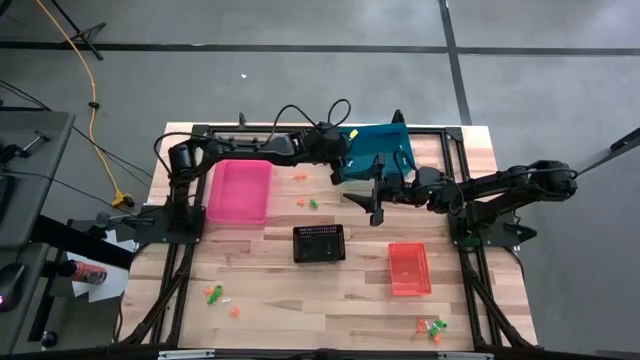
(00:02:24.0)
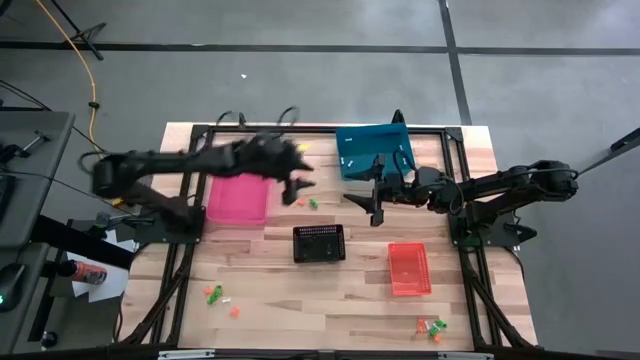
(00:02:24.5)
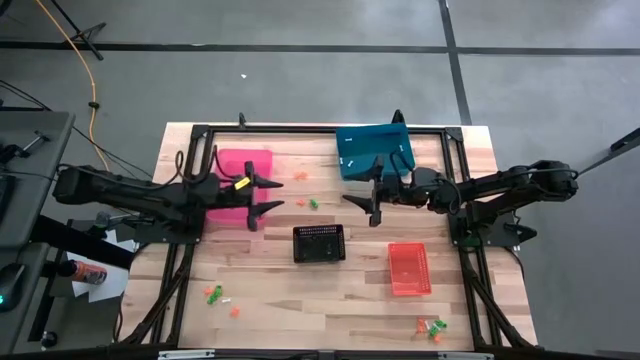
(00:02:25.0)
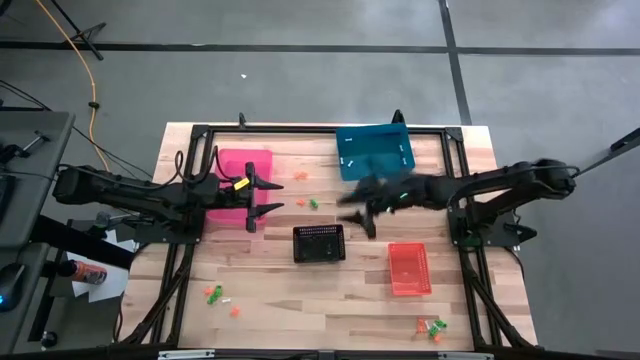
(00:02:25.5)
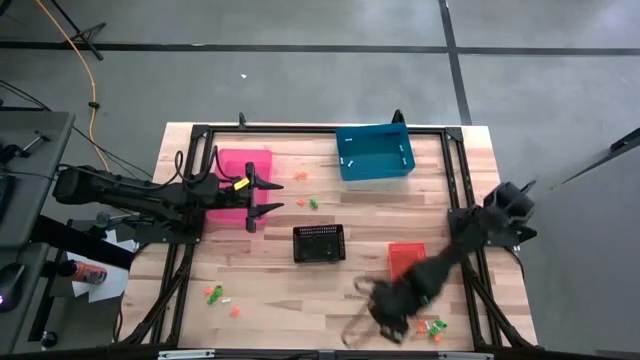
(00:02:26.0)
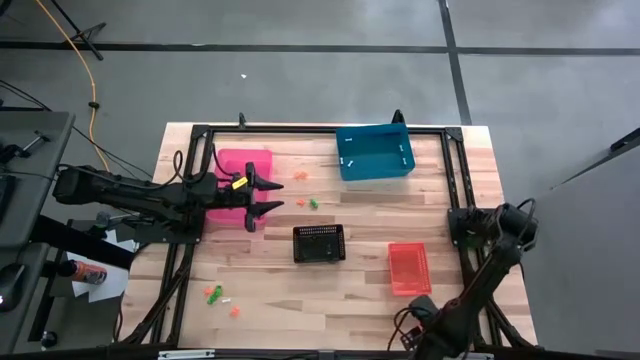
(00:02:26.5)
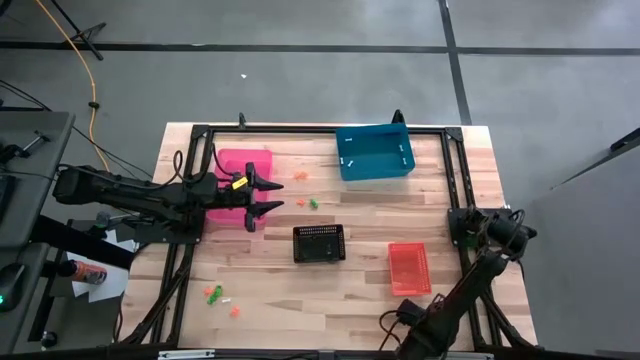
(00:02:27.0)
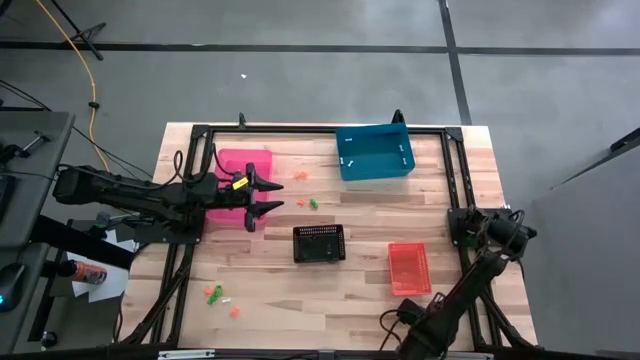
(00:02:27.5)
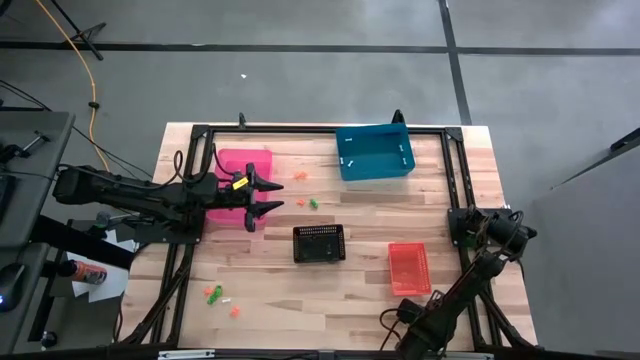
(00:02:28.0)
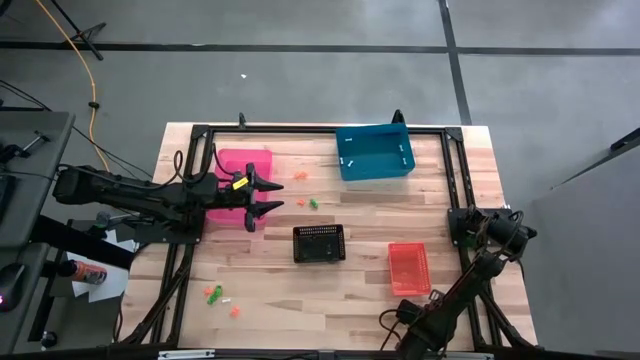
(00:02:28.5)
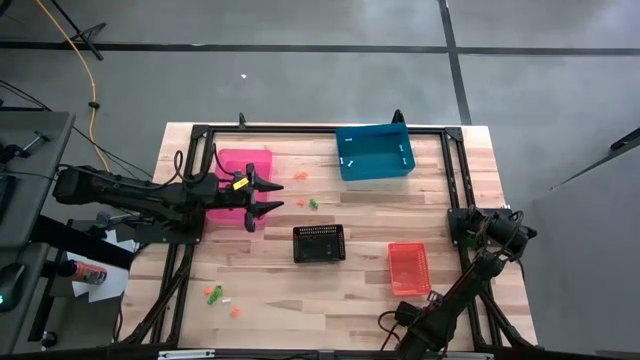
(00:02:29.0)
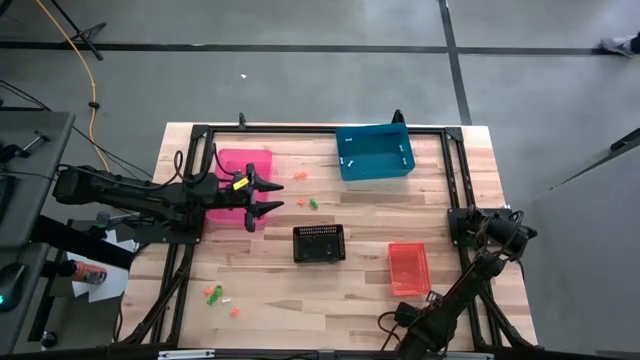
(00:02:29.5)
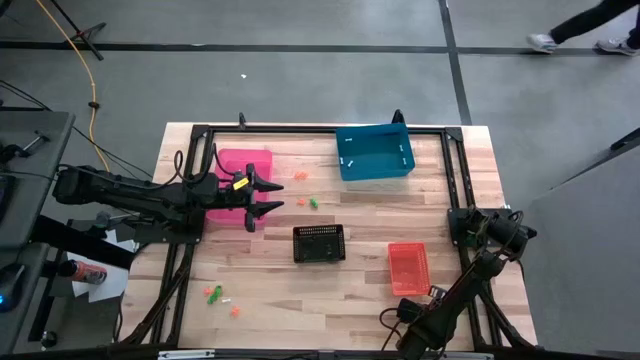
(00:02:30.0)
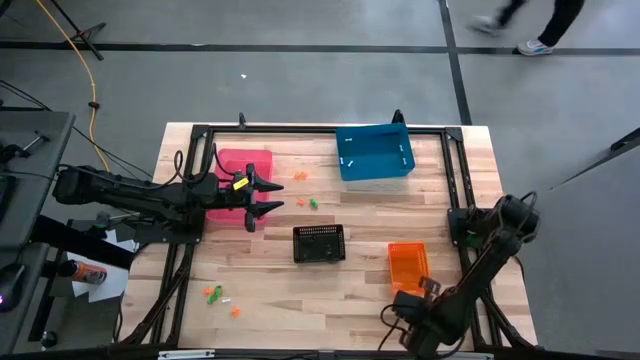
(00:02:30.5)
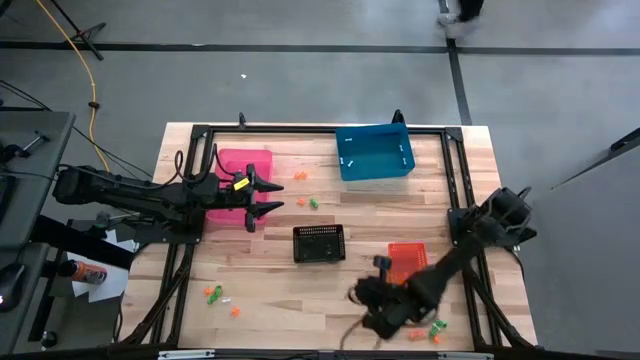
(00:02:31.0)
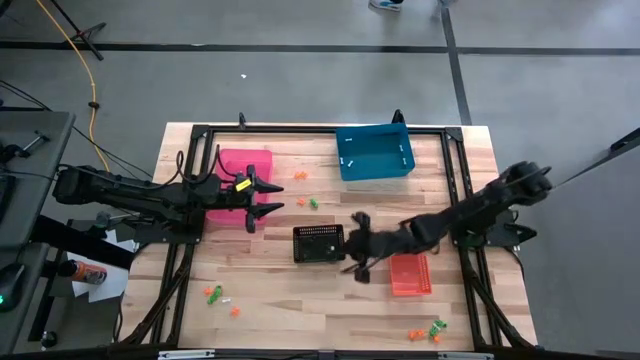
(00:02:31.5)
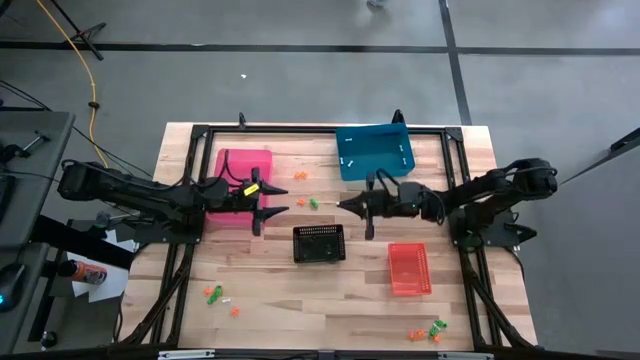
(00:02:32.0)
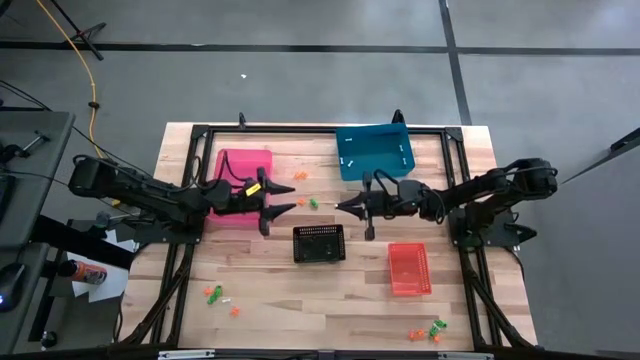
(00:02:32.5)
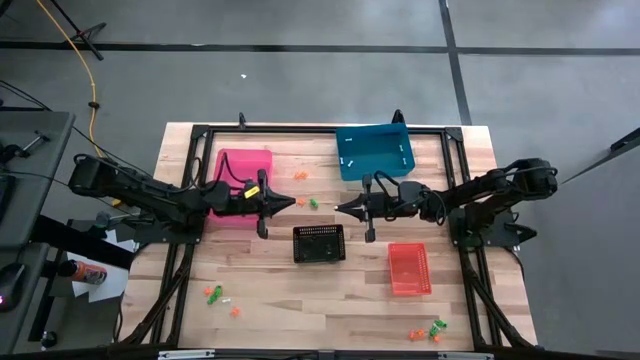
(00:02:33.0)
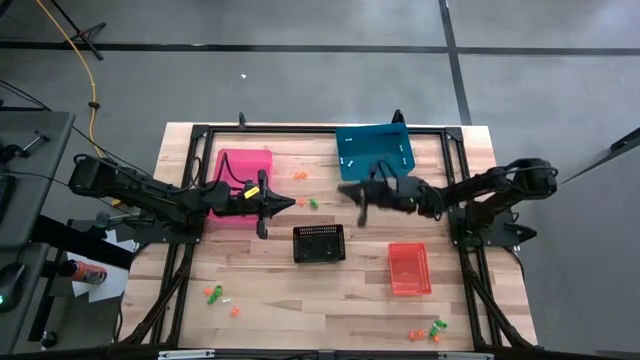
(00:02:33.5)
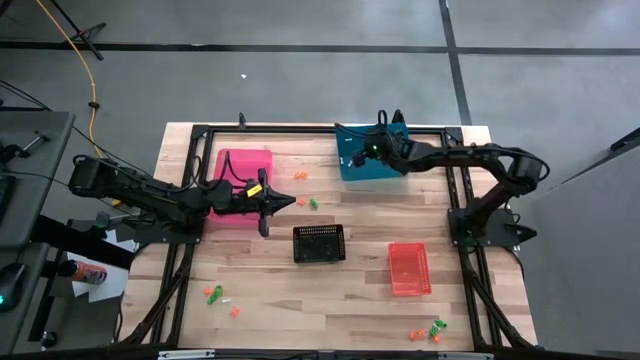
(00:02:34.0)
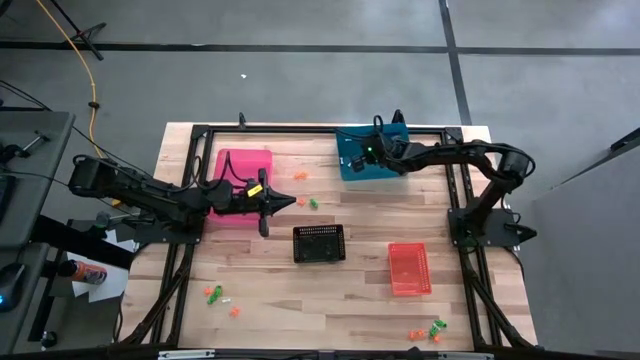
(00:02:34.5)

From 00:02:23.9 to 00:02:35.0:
Task: Sort Halloween decoration
Put the white bone toy into the blue bin

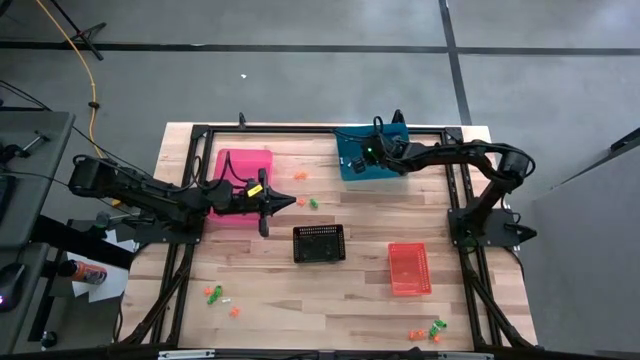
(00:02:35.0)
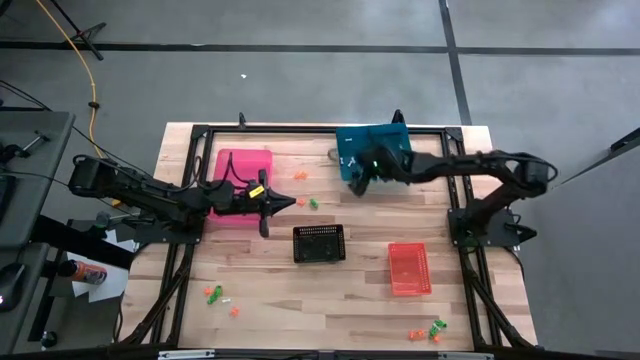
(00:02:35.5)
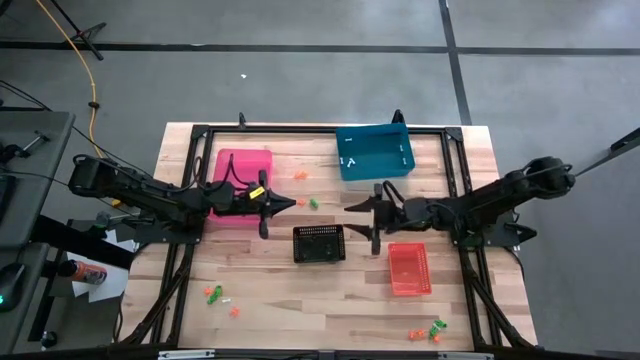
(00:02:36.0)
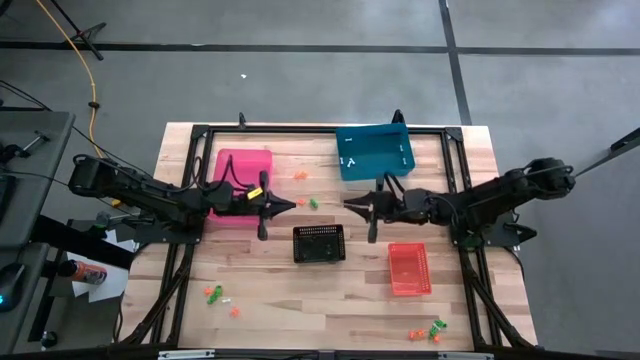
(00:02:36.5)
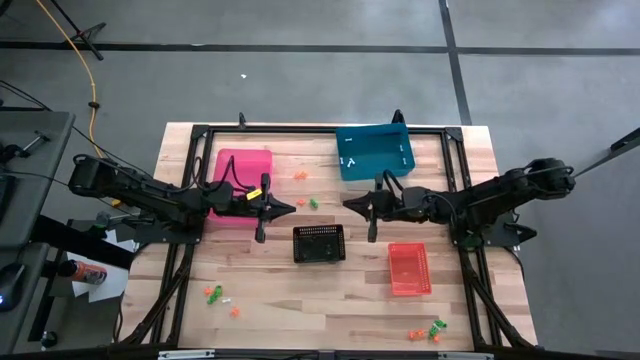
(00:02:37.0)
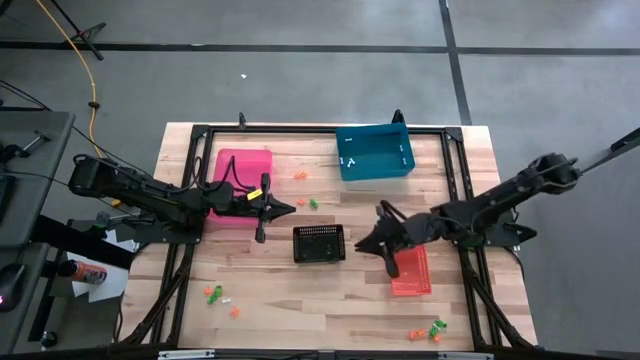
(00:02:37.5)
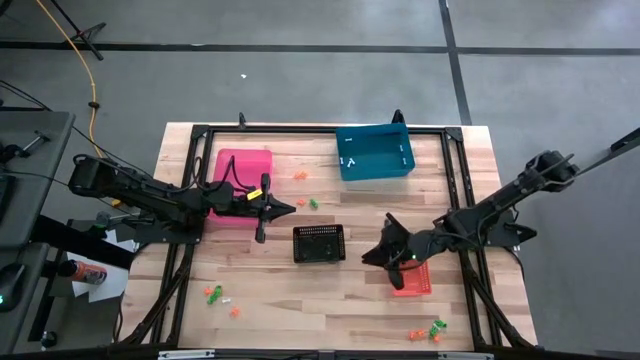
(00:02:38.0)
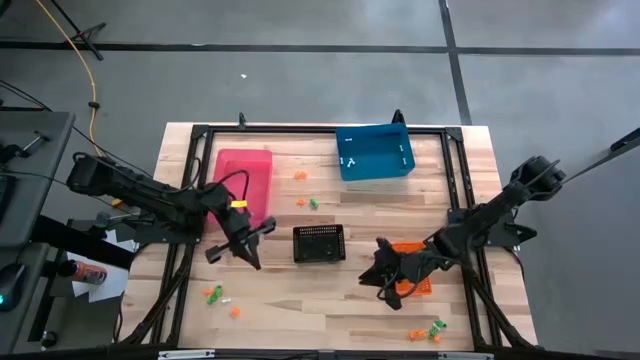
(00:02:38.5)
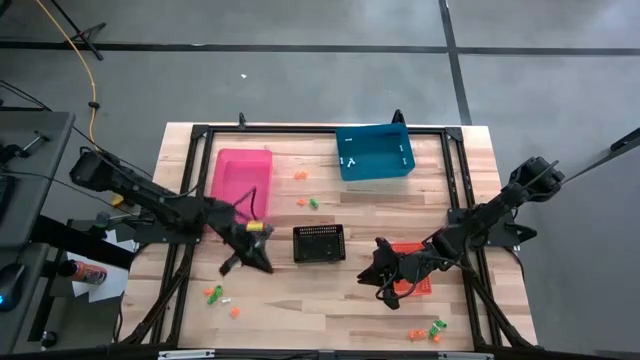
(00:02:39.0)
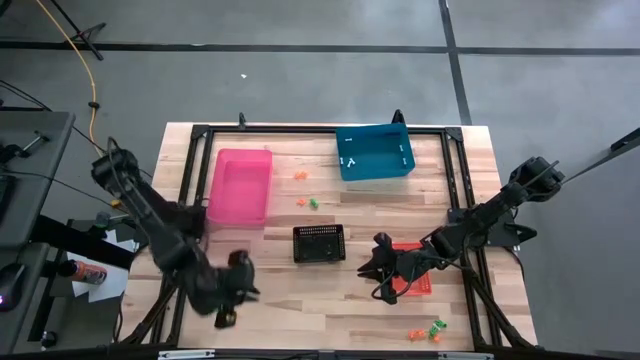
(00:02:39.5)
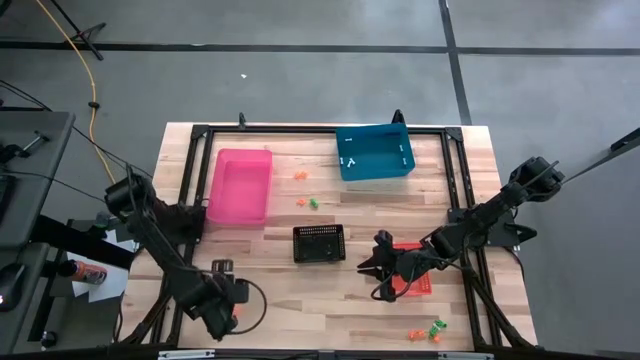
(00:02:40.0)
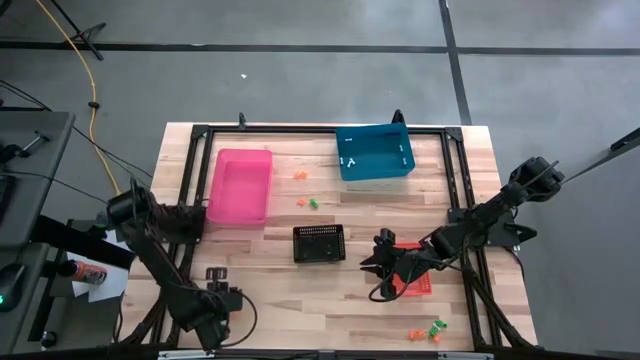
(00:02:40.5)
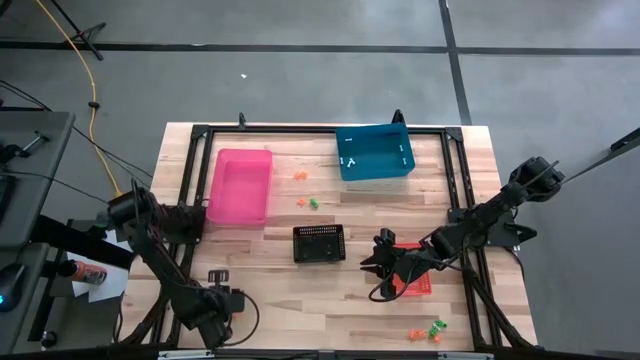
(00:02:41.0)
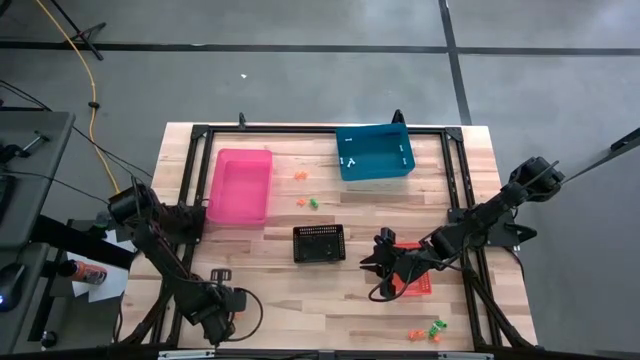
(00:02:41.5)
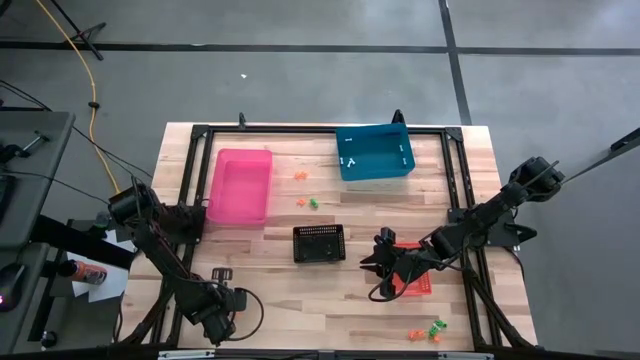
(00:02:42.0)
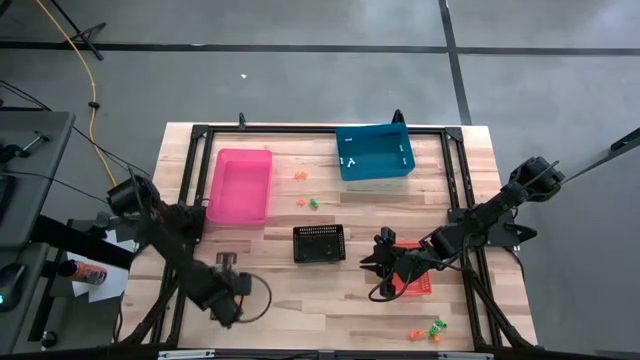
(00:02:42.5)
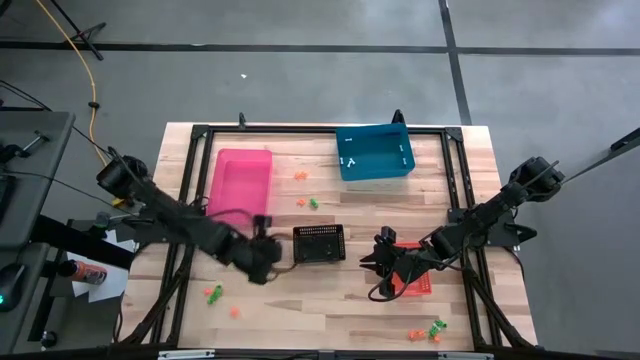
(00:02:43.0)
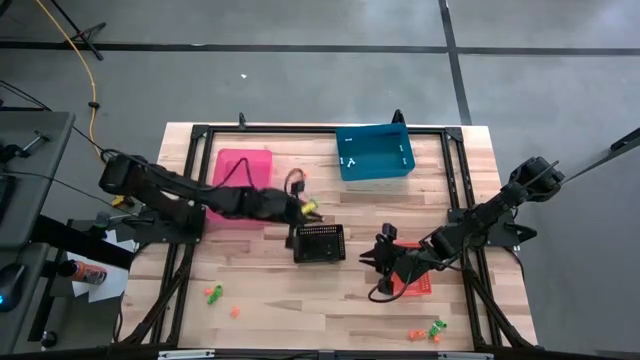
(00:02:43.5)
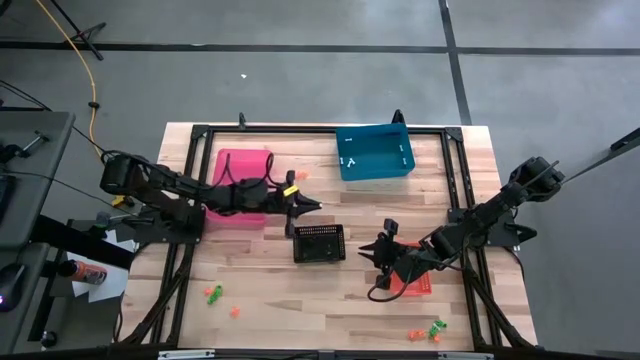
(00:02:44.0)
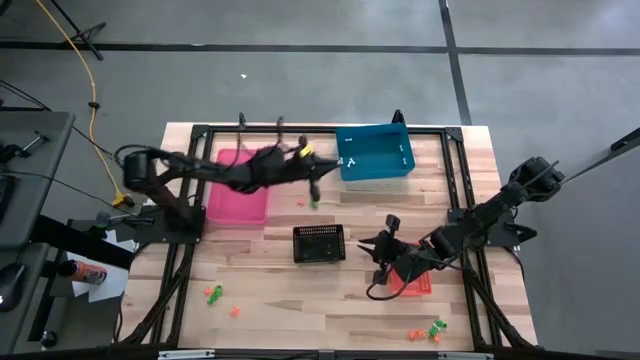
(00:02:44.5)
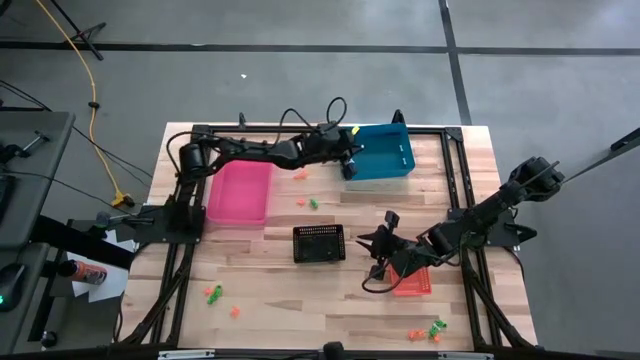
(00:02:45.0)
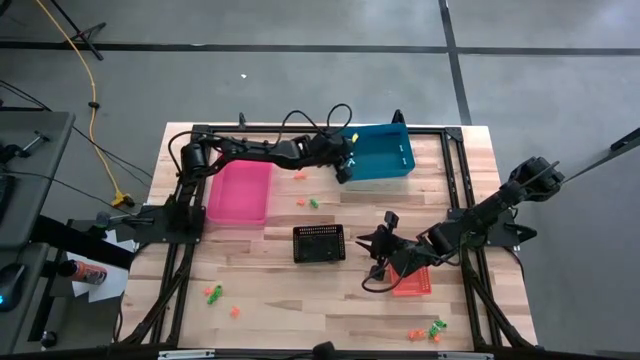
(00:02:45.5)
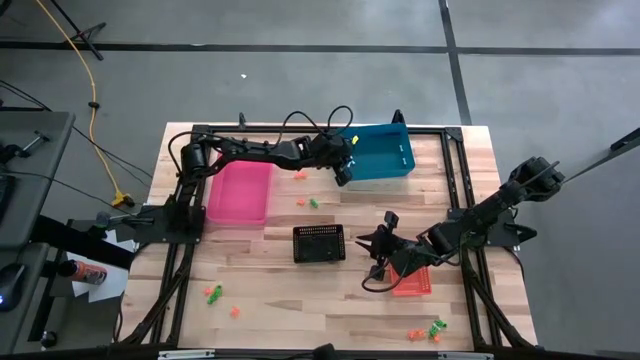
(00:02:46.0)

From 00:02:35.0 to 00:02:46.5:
Put the white bone toy into the blue bin
